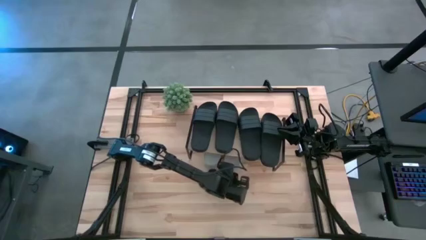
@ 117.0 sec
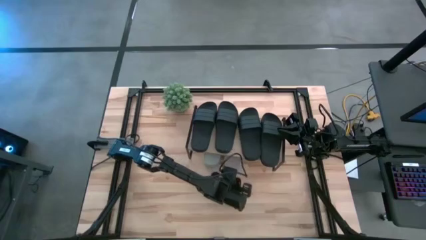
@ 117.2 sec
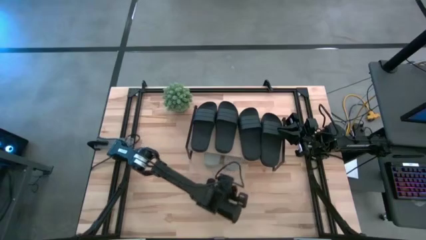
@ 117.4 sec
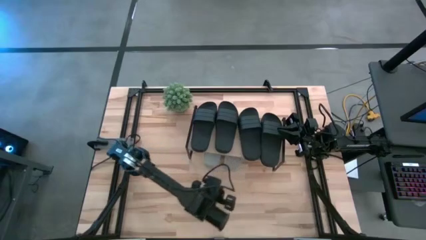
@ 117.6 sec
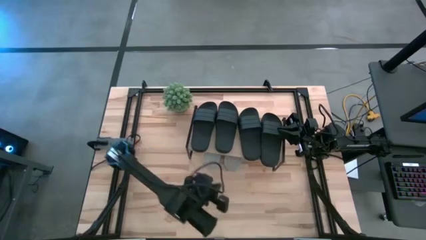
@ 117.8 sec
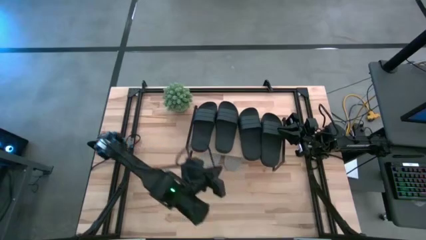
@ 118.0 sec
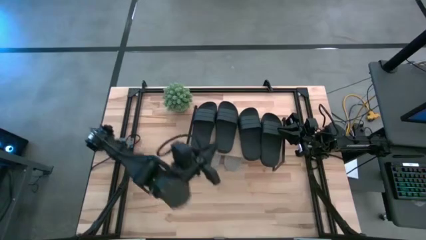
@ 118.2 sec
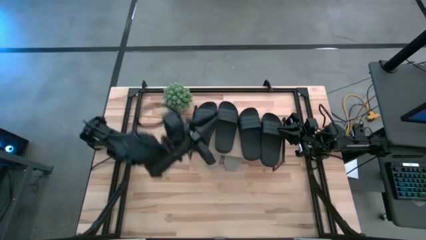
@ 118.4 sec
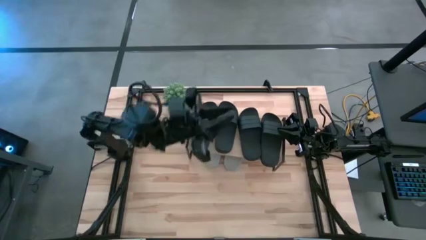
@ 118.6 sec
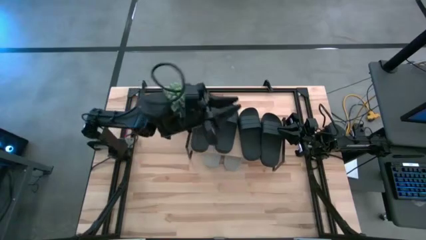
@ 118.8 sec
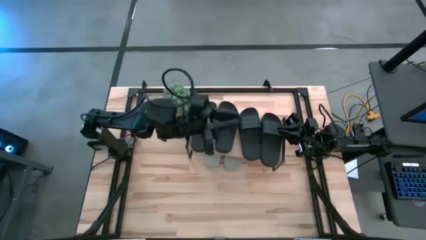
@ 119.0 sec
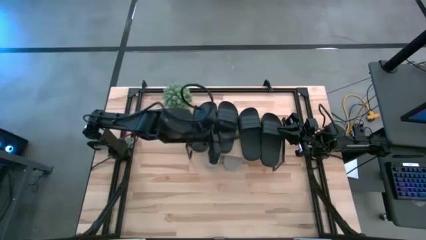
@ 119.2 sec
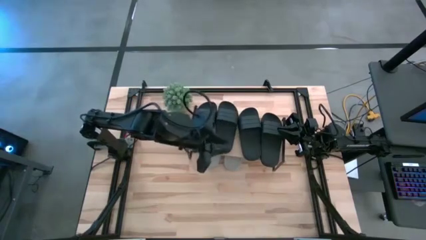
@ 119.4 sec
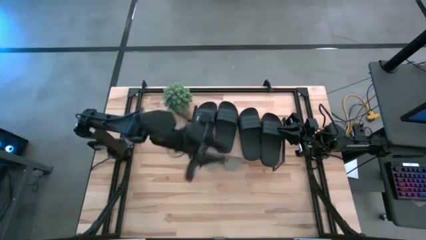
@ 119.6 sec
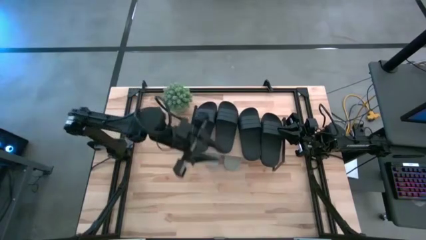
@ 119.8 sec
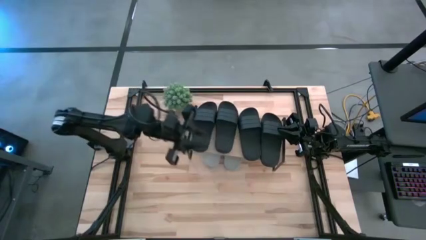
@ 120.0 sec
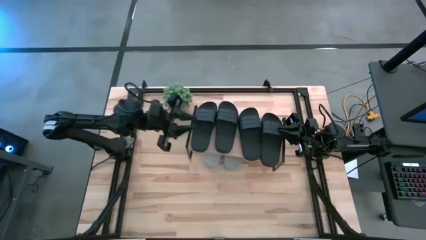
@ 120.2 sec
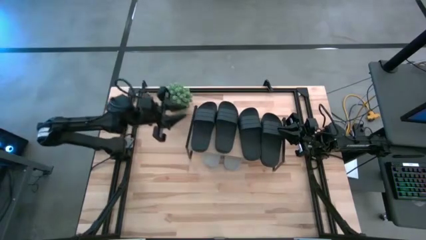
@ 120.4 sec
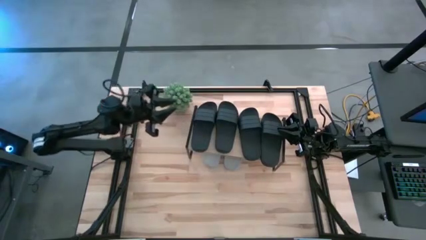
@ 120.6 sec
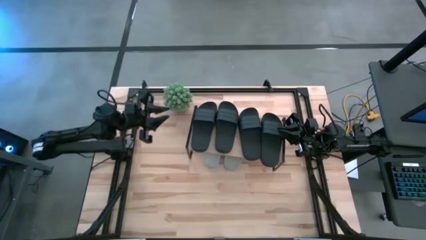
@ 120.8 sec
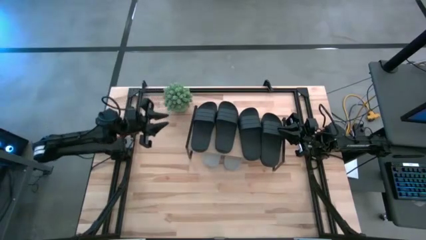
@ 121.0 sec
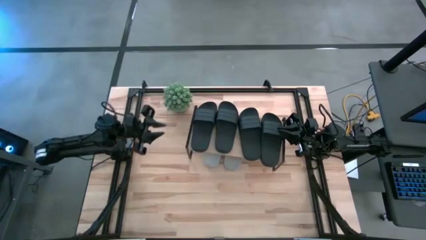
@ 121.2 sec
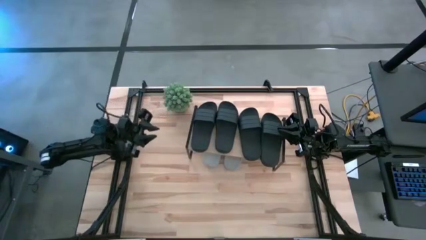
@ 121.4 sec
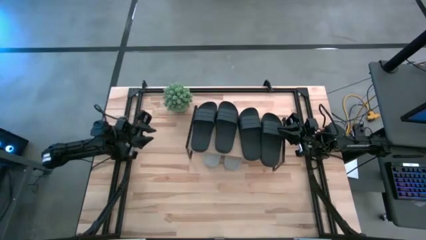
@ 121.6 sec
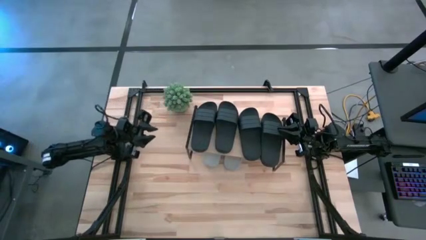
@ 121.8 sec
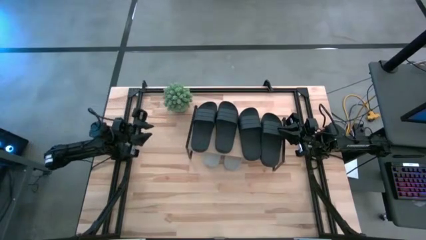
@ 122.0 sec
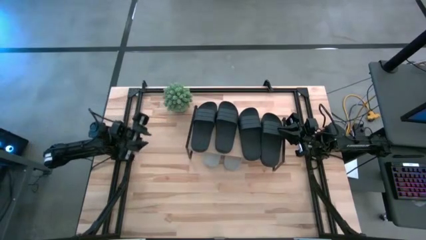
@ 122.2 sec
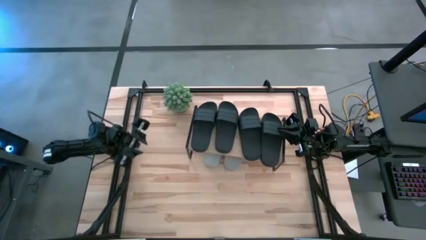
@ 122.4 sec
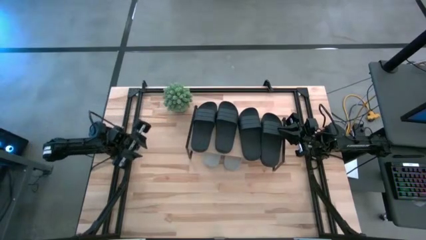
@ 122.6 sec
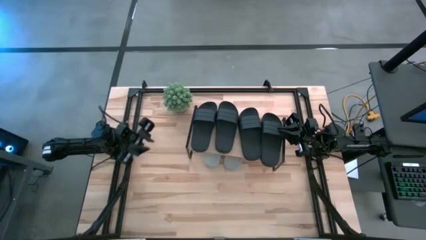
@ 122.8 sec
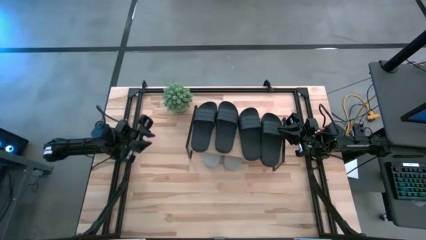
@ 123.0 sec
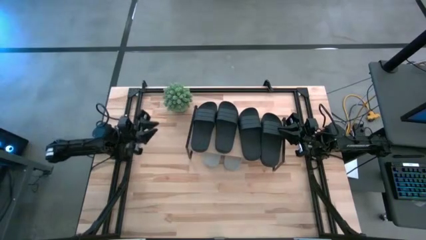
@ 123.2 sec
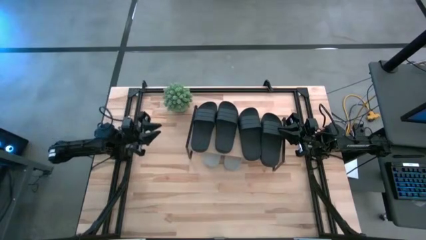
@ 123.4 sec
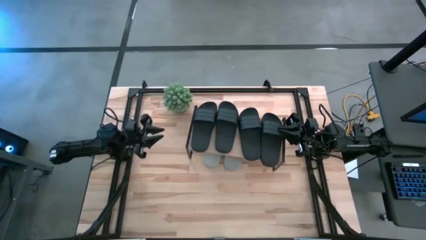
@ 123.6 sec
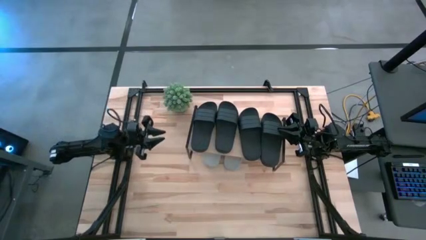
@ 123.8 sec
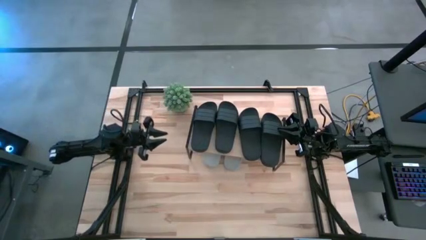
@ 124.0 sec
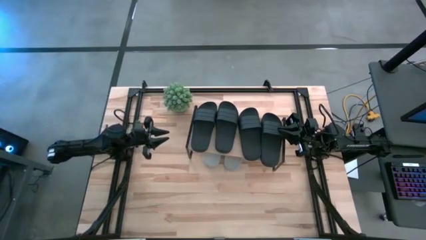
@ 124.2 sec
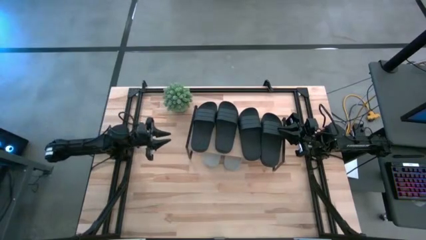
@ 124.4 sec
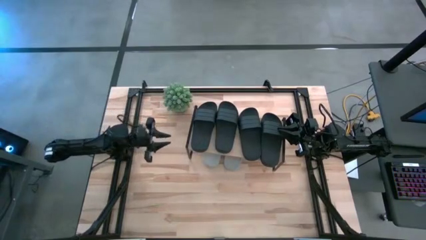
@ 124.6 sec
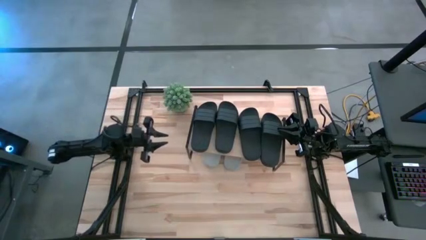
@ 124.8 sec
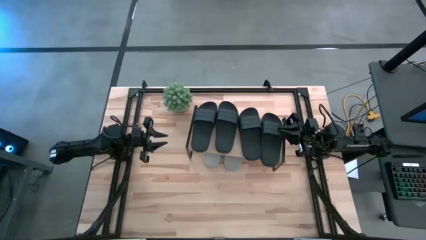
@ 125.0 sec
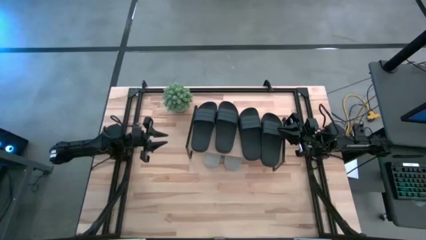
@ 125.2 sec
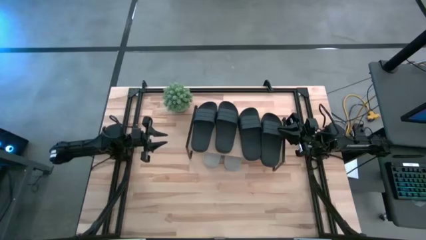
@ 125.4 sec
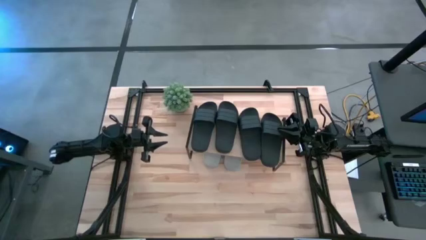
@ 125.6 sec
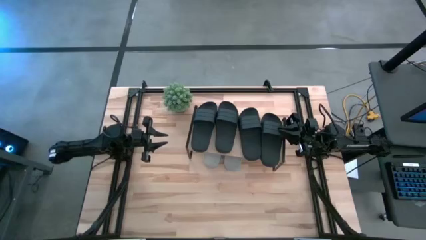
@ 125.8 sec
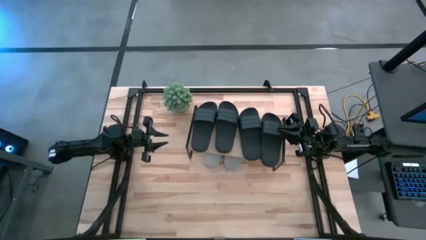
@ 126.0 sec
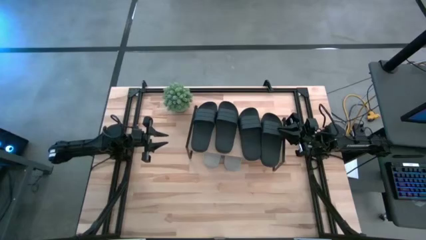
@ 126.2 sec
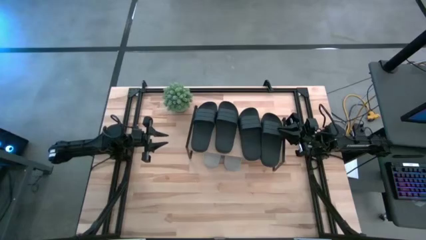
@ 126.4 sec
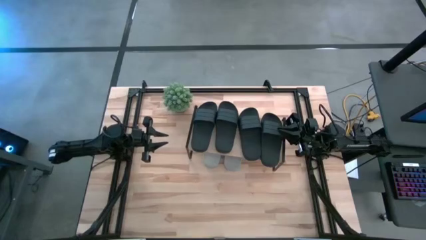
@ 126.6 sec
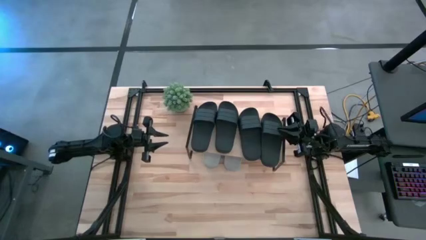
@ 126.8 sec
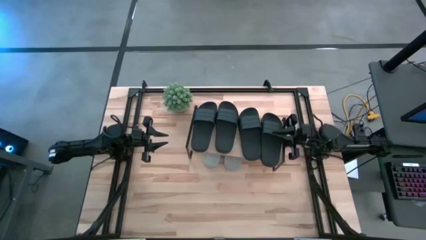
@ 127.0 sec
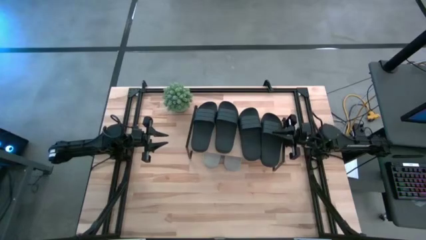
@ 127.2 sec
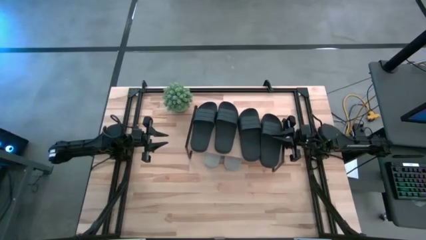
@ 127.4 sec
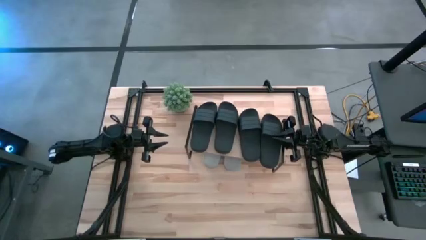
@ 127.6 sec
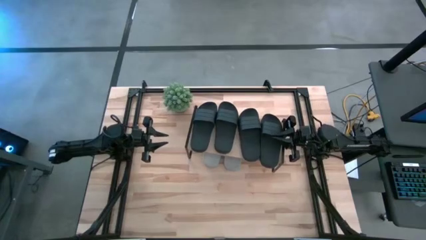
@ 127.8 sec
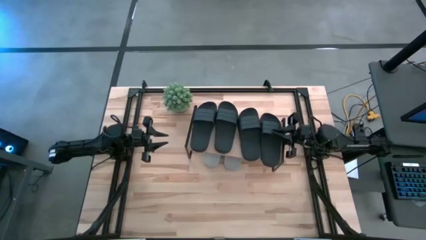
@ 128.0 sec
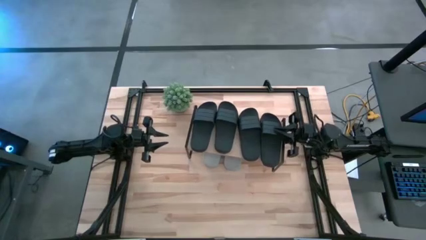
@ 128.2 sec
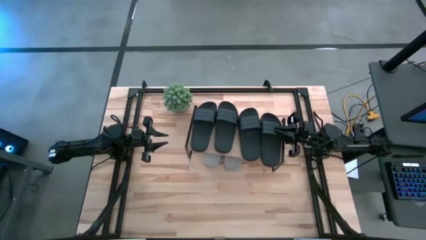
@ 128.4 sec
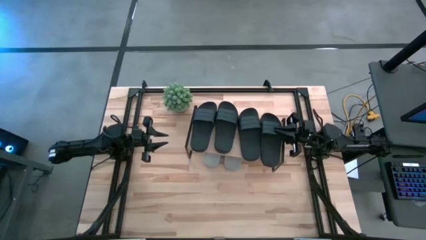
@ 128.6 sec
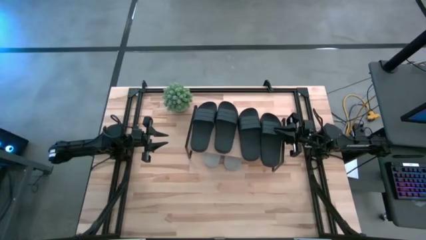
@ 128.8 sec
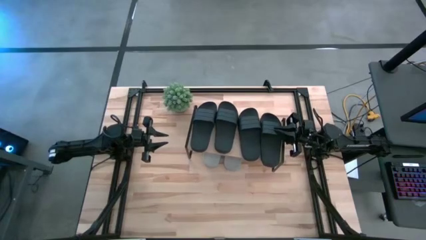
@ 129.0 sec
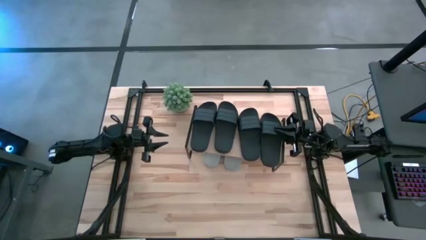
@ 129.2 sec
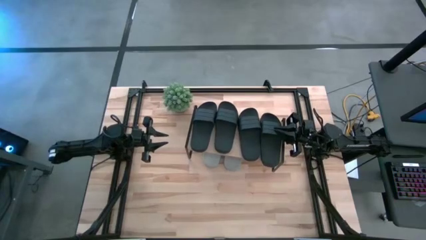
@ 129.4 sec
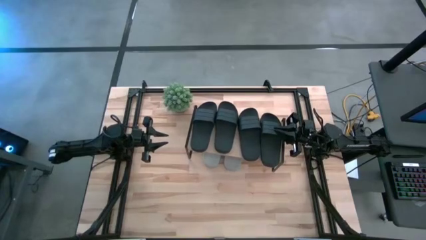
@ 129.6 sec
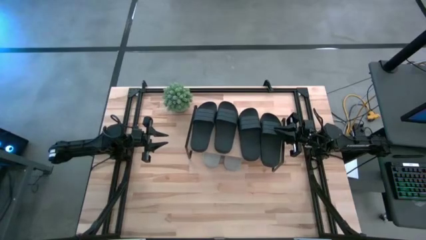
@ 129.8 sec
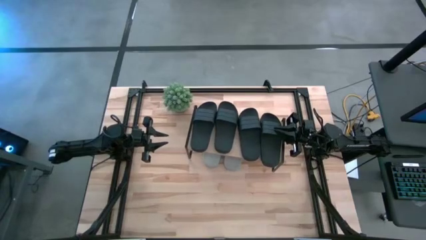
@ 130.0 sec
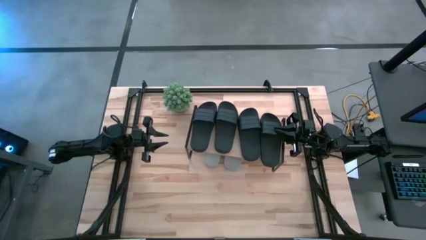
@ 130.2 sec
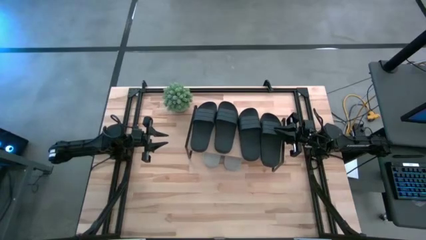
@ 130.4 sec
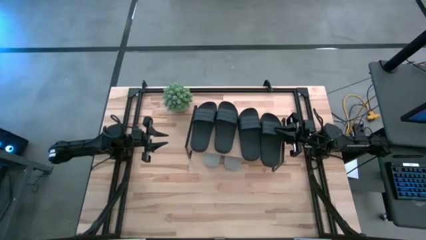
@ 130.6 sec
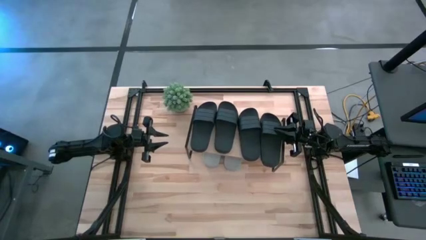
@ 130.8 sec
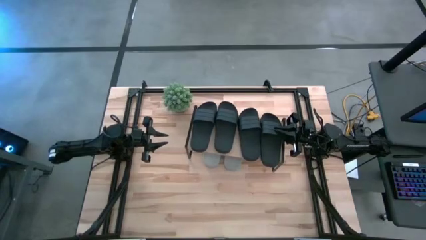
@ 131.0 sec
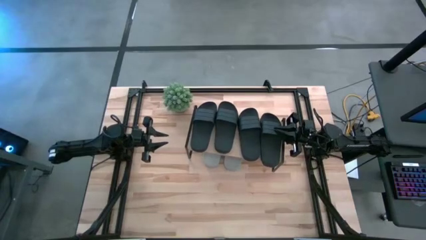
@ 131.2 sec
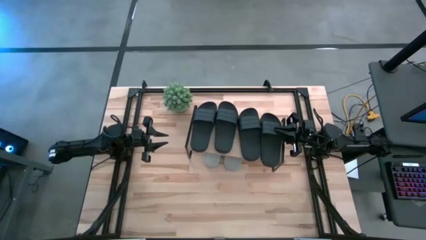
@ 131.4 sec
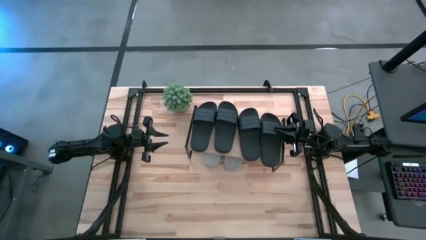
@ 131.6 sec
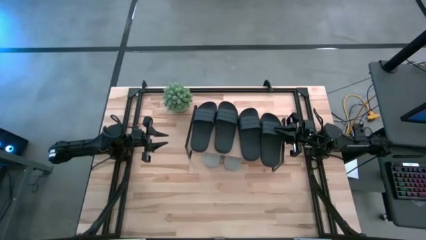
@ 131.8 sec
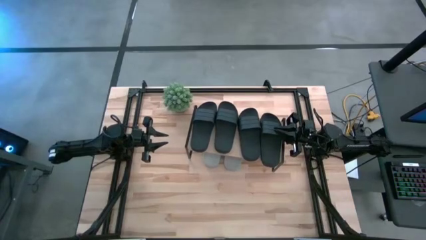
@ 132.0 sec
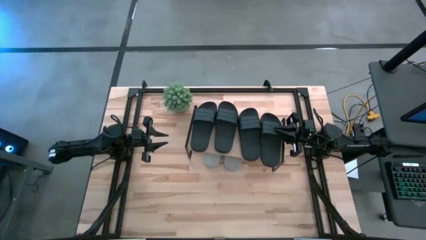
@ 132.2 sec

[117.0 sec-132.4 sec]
Task: Pick and place slides into the shelf
Return to Home Position
